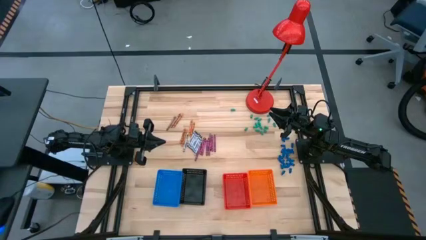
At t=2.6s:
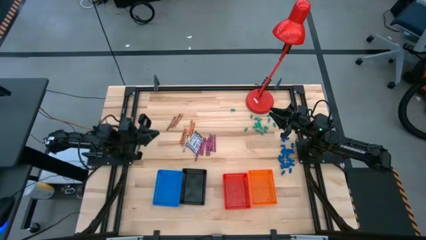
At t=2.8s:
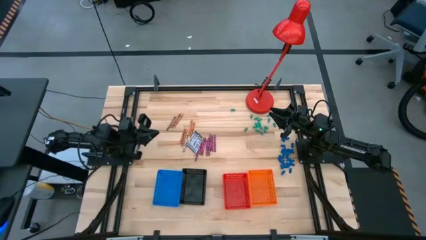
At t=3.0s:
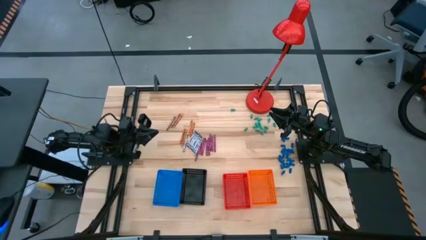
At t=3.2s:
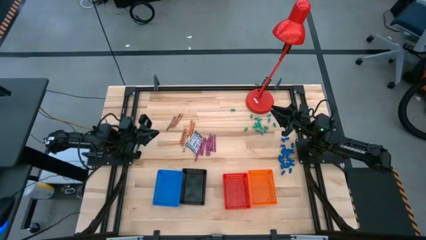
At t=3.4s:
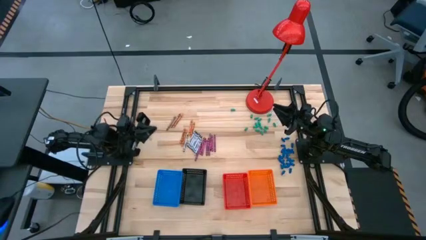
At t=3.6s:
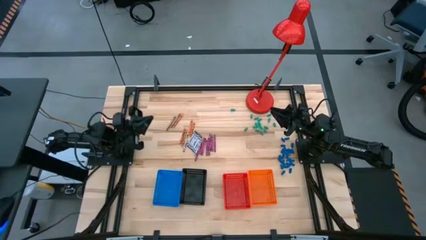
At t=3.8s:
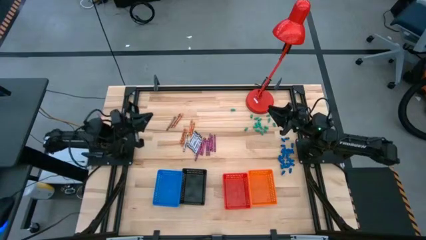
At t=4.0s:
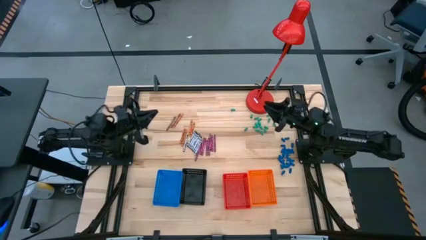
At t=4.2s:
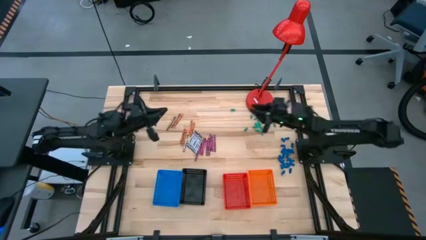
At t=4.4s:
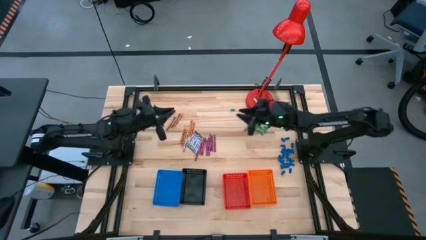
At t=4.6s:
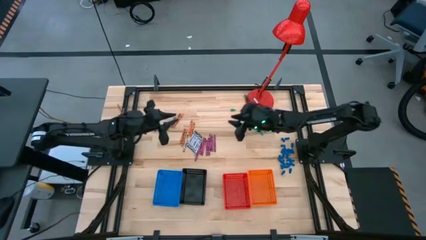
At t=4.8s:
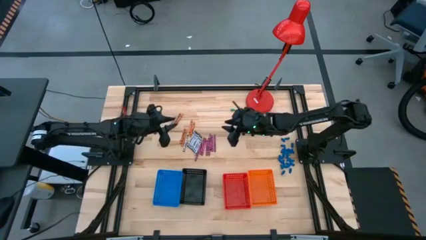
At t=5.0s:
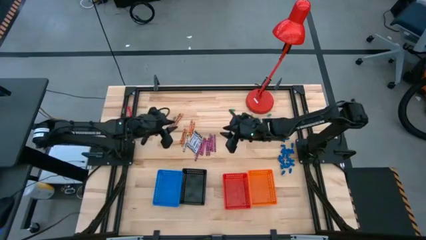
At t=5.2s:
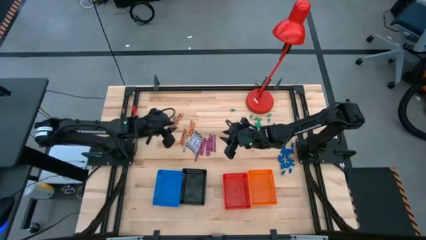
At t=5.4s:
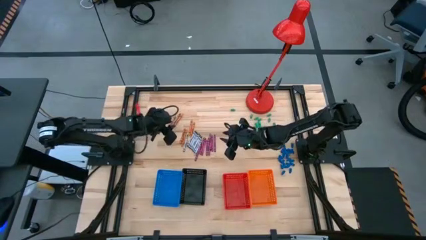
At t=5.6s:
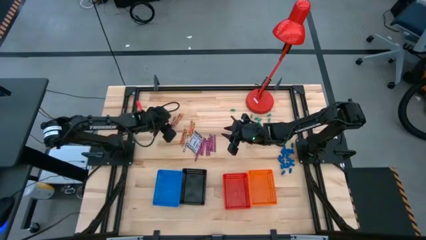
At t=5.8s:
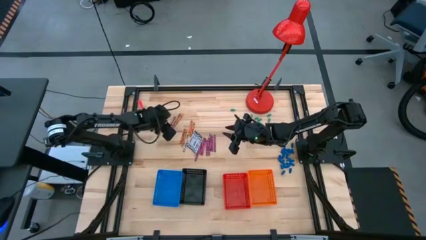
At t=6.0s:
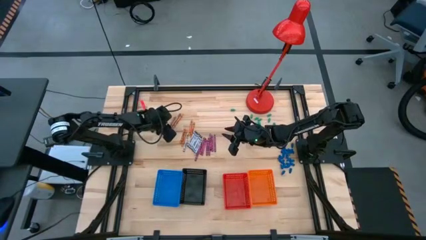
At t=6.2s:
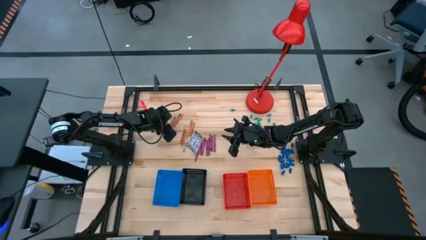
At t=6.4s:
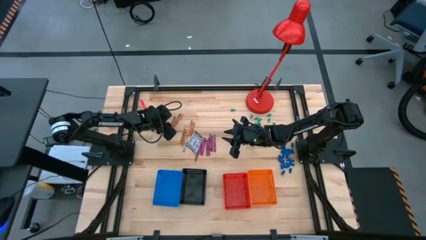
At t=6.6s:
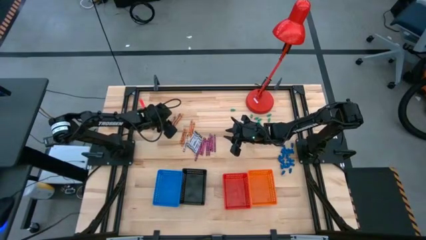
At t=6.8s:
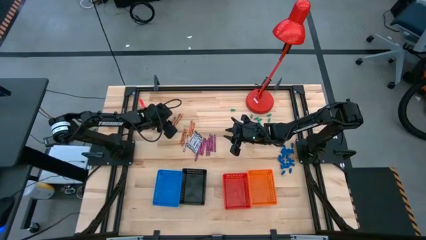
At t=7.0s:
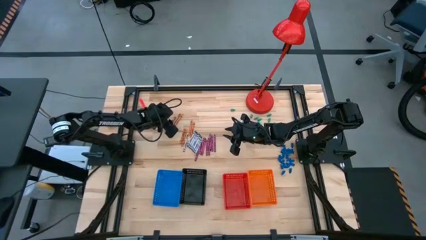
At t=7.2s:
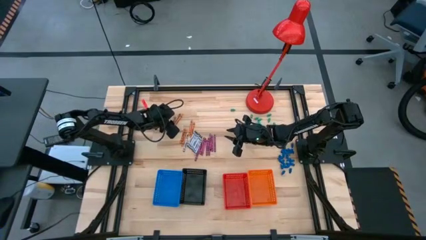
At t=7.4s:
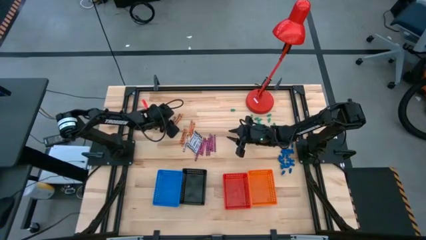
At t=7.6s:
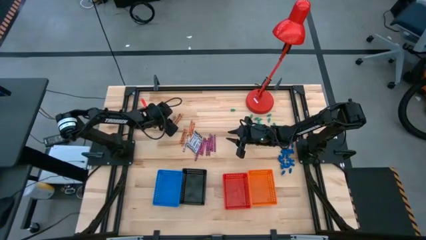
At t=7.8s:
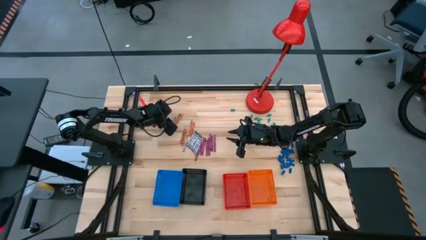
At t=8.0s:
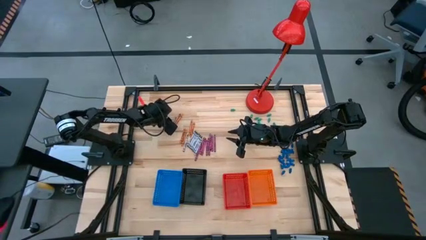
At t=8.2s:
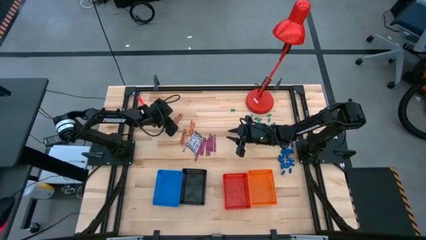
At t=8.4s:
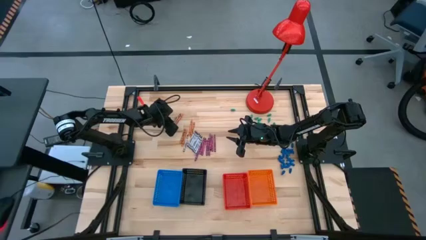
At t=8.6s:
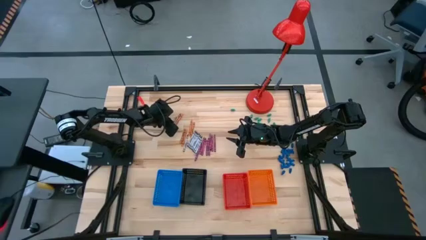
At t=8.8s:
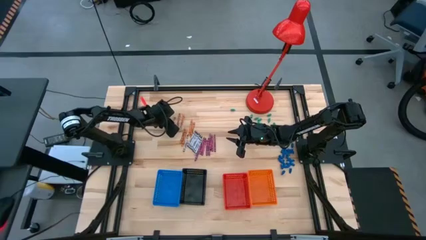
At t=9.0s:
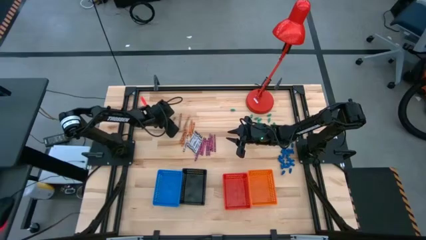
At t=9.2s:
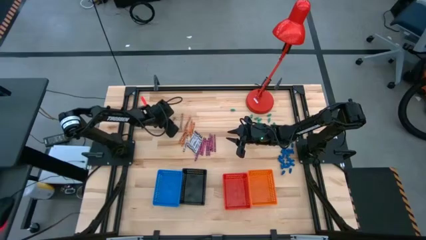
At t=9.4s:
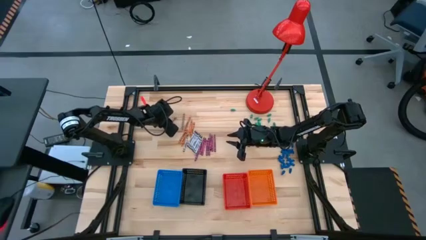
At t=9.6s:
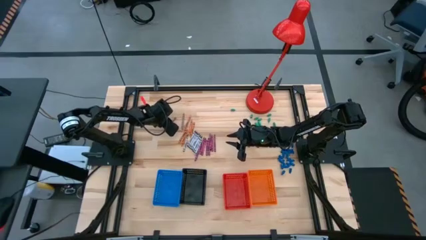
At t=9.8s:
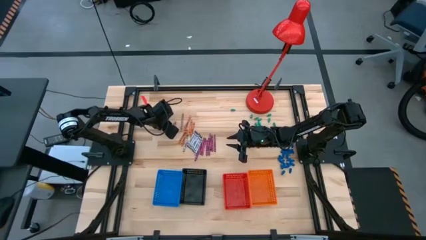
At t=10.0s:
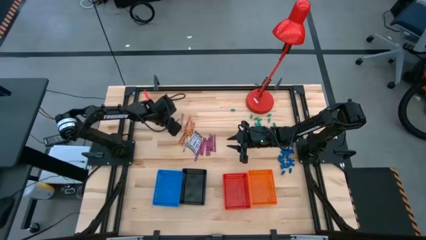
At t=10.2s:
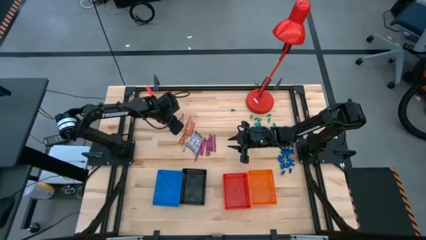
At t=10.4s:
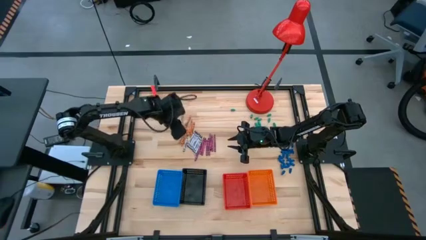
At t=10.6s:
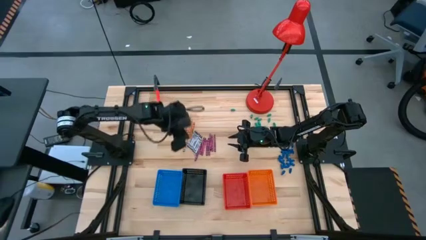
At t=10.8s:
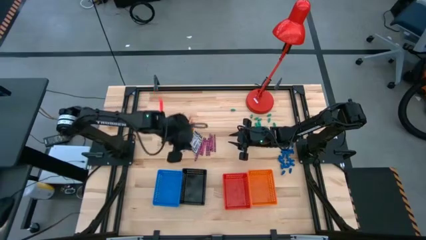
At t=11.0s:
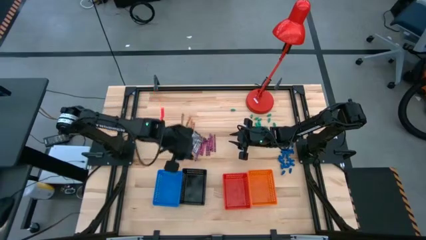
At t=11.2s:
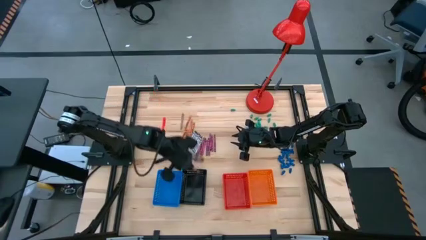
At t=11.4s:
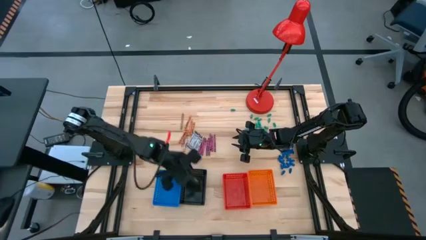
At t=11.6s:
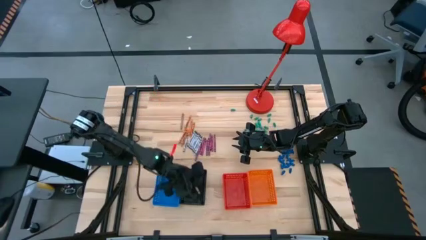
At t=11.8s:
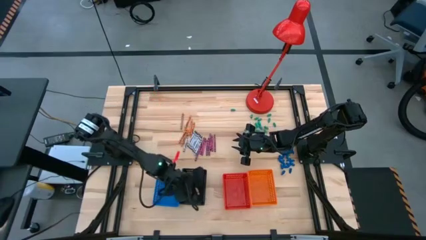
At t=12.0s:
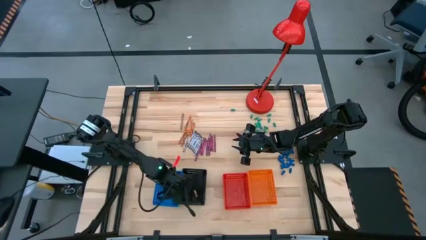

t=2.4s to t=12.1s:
Task: Sort crayons
Put the brown crayon into the black basket

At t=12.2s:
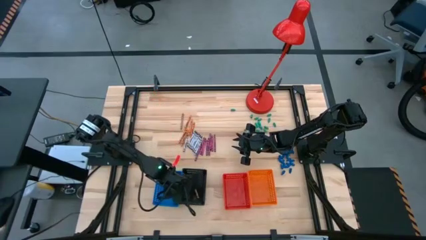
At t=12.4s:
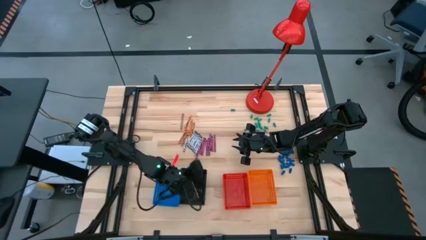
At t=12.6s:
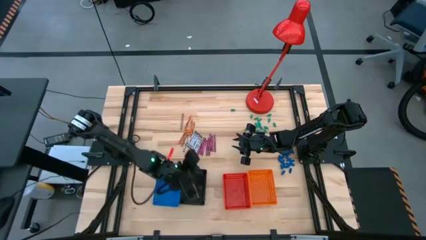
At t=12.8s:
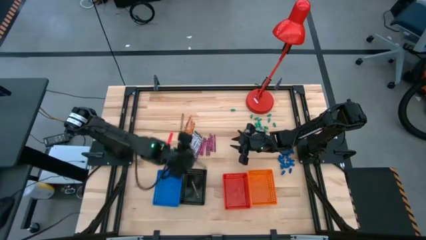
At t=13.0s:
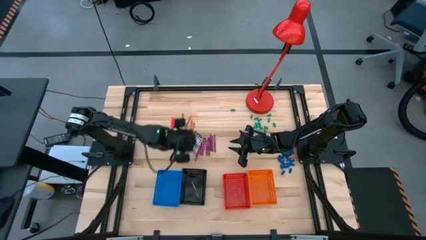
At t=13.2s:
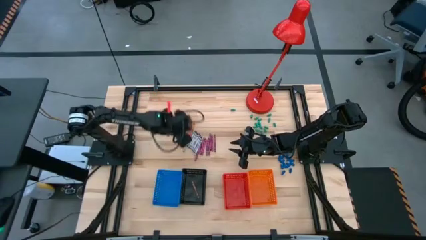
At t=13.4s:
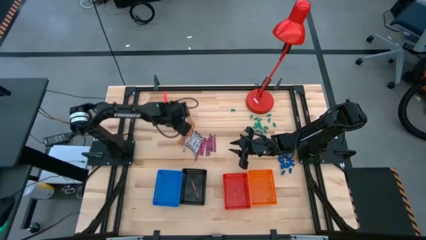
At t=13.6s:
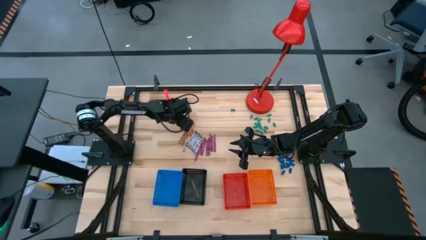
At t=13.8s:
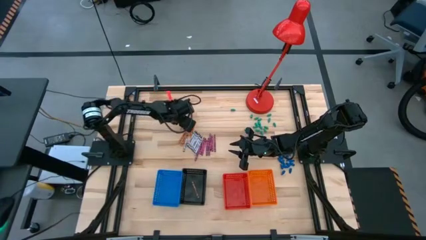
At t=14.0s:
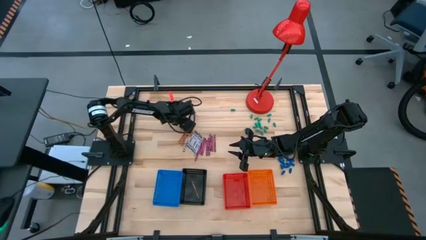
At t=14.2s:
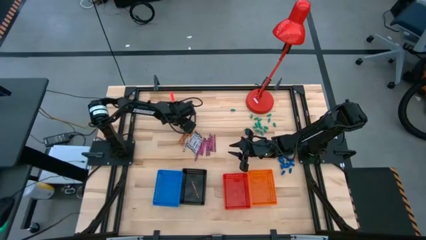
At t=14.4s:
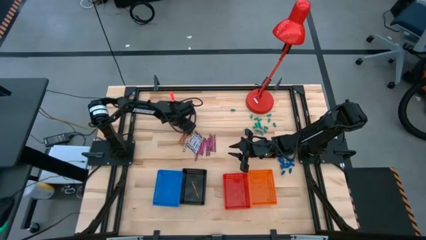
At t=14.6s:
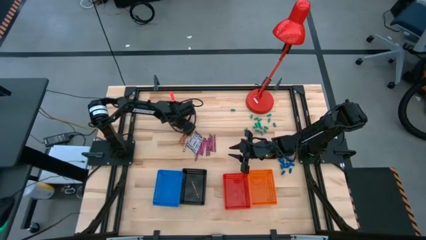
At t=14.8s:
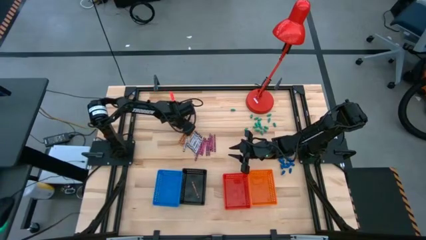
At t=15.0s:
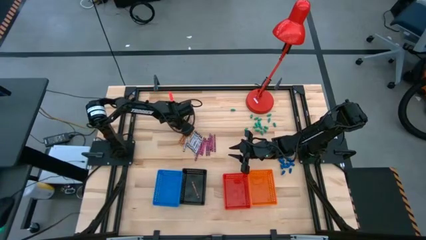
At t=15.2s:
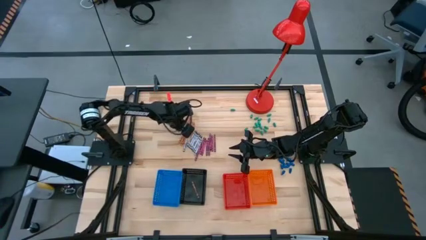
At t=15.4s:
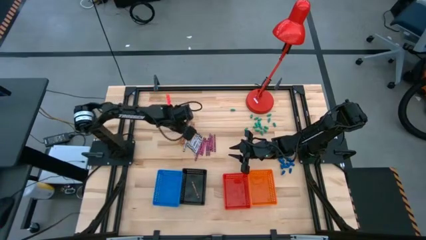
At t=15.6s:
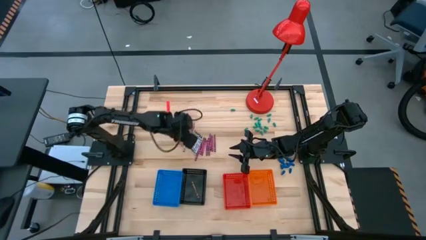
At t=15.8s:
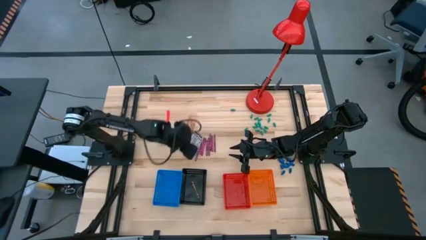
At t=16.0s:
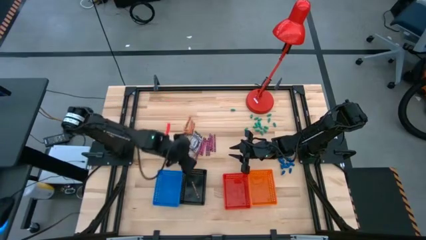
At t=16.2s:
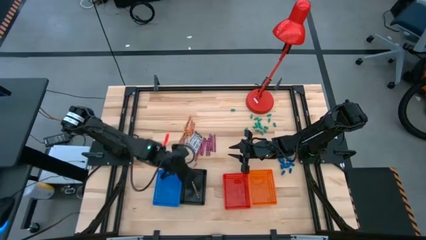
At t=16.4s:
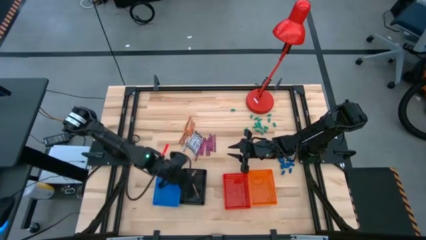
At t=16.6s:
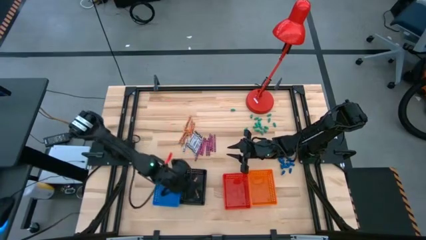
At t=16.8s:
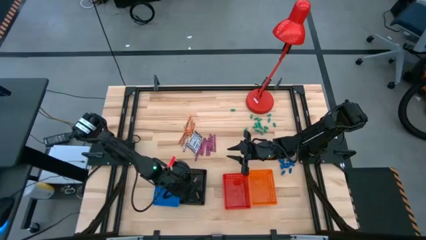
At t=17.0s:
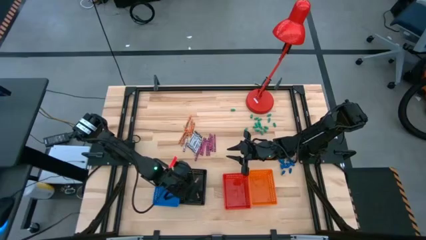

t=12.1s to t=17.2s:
Put the brown crayon into the black basket
